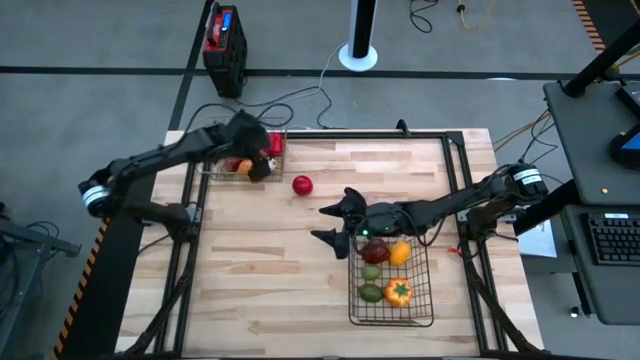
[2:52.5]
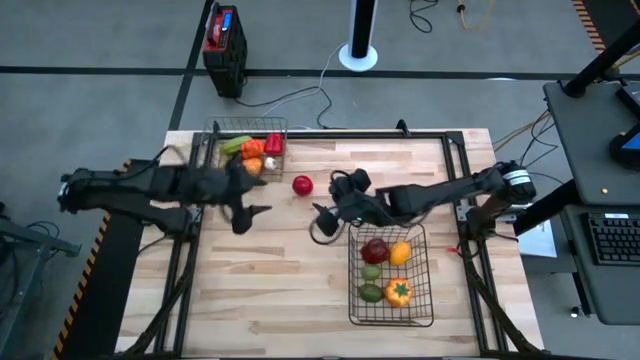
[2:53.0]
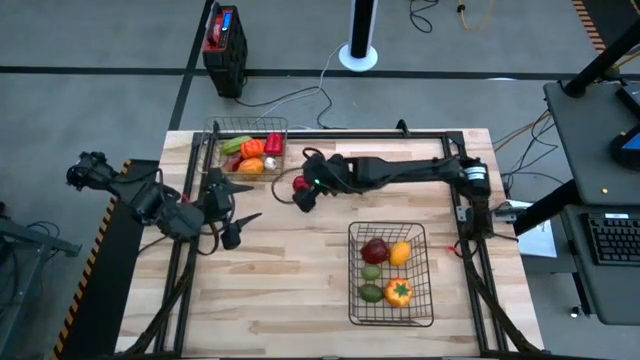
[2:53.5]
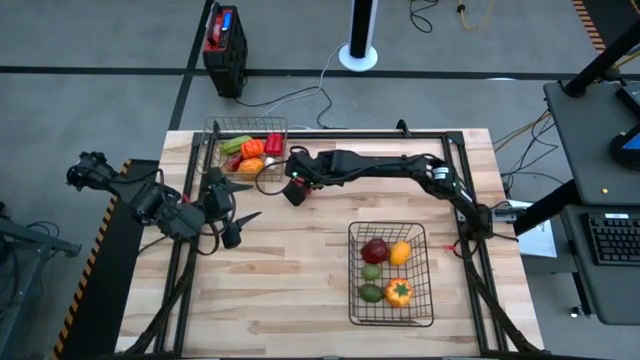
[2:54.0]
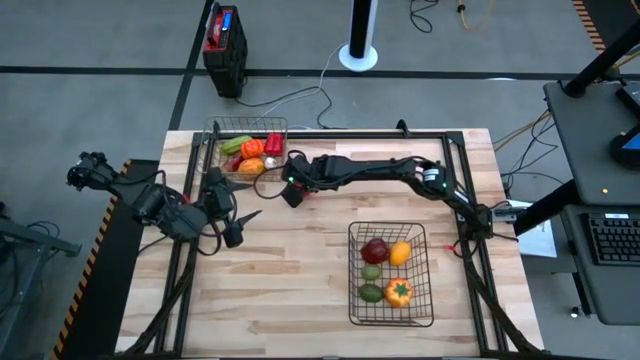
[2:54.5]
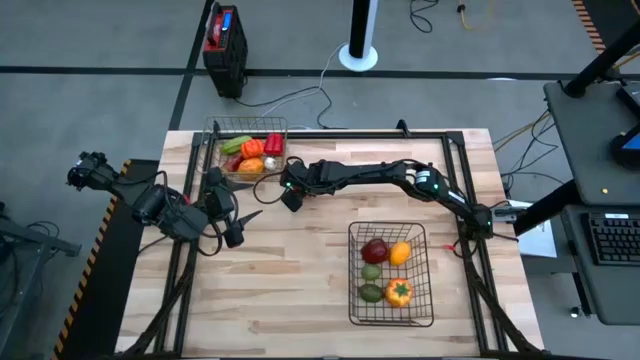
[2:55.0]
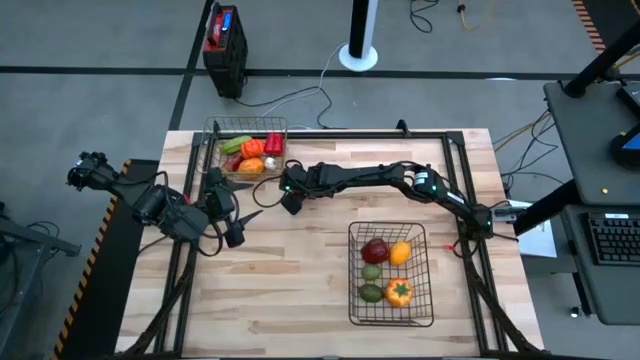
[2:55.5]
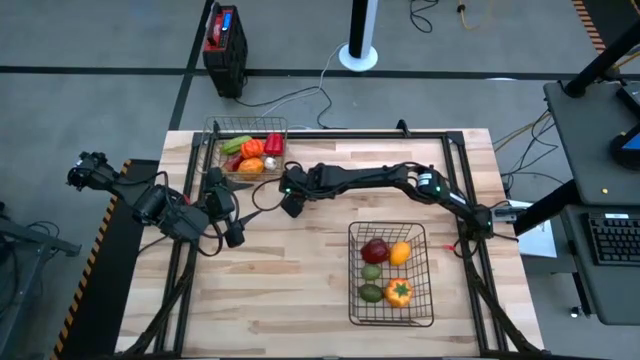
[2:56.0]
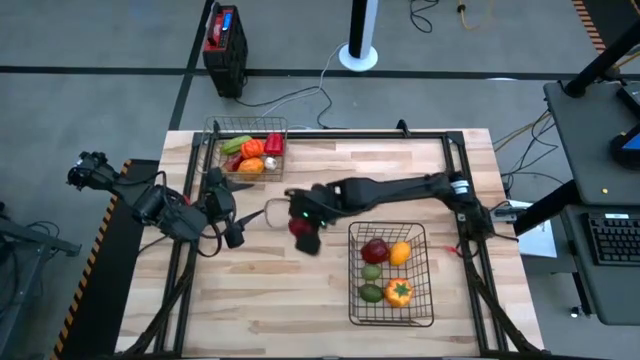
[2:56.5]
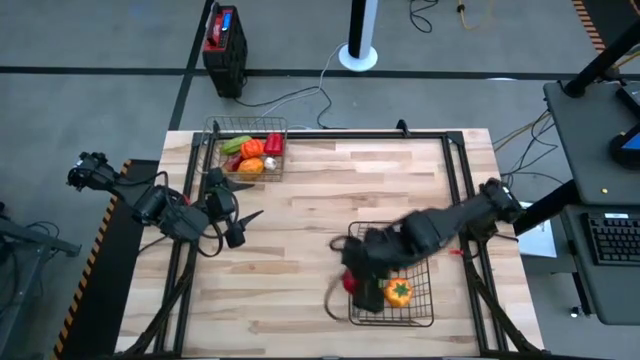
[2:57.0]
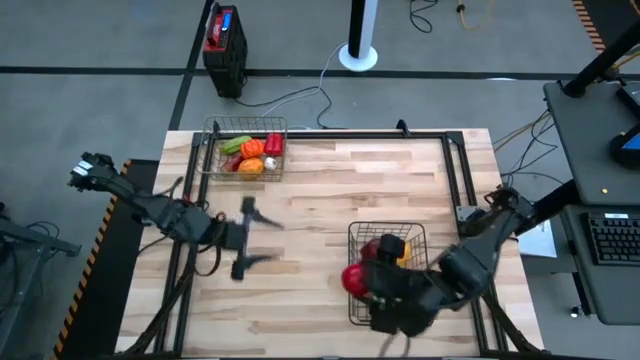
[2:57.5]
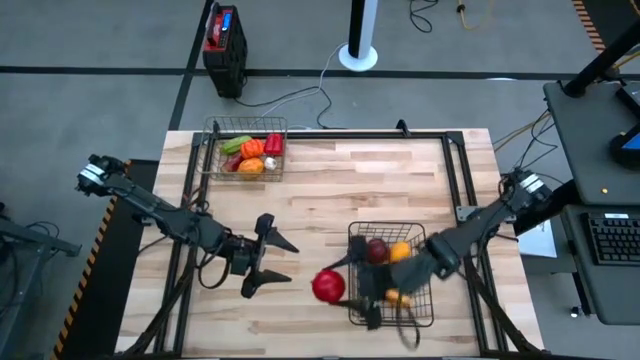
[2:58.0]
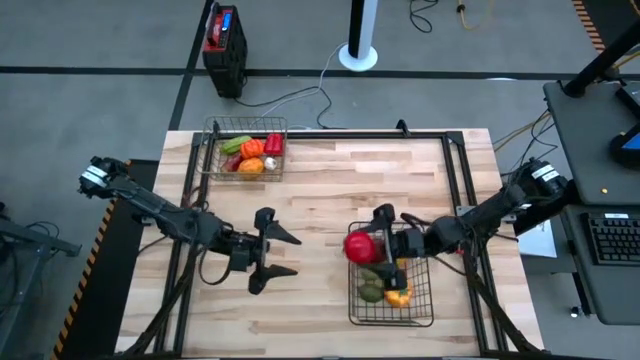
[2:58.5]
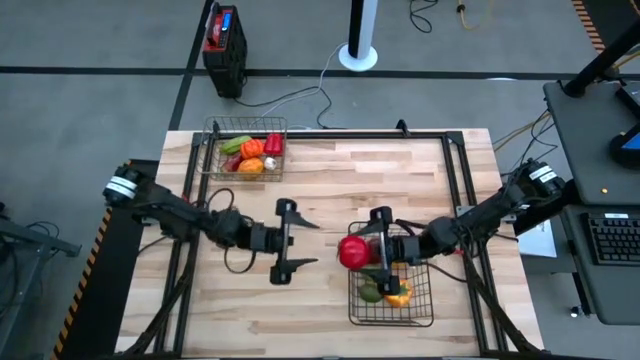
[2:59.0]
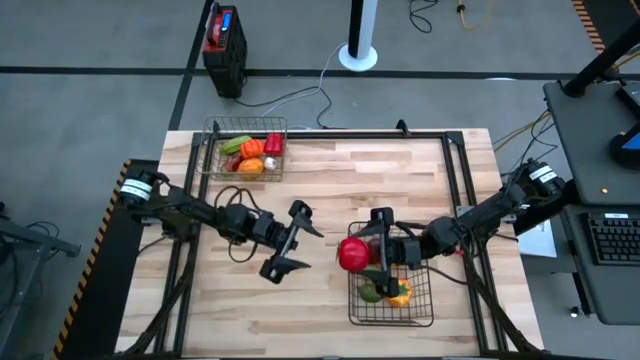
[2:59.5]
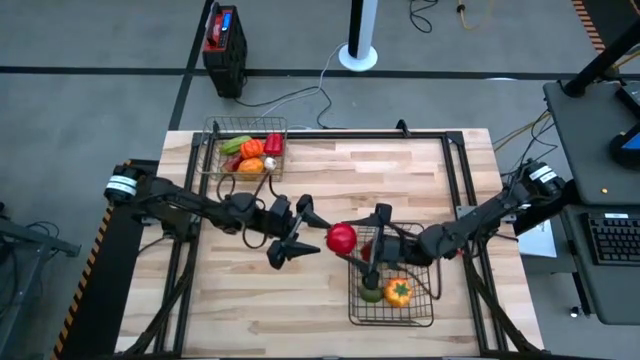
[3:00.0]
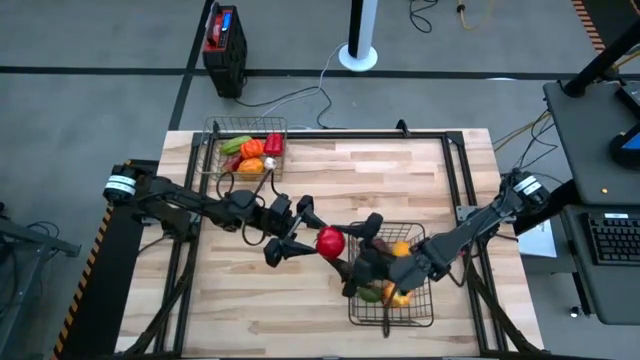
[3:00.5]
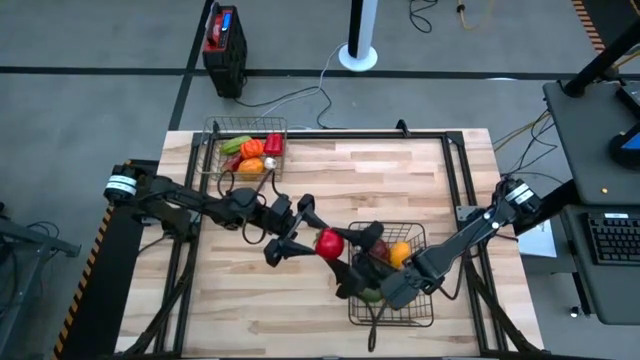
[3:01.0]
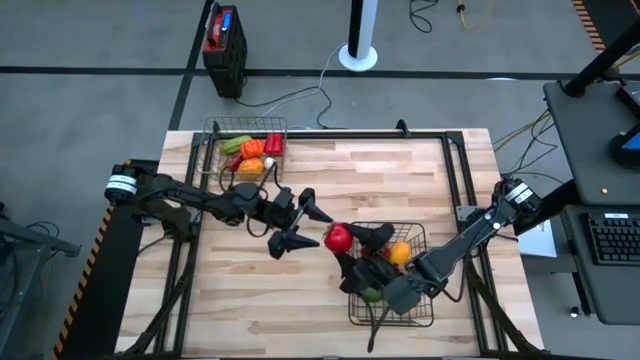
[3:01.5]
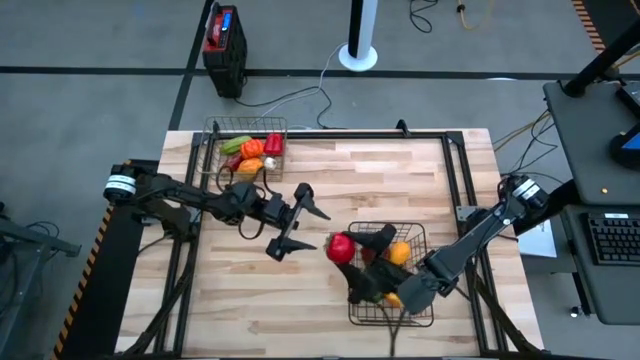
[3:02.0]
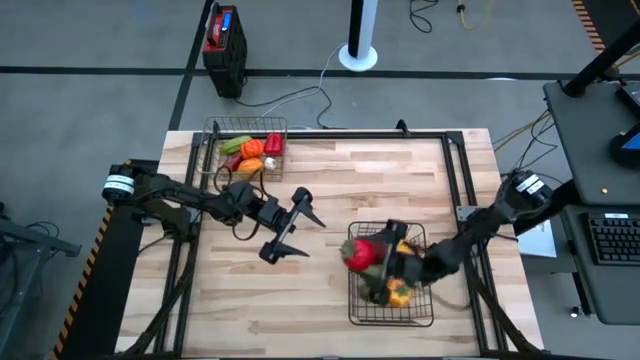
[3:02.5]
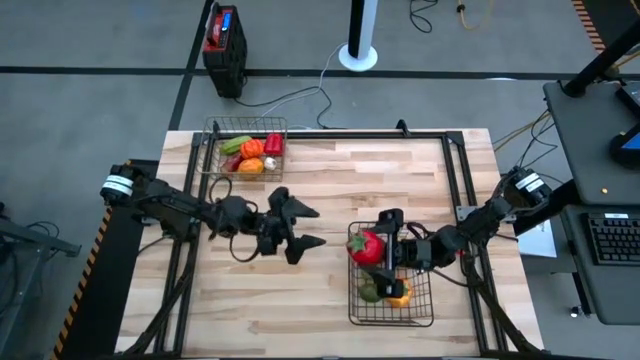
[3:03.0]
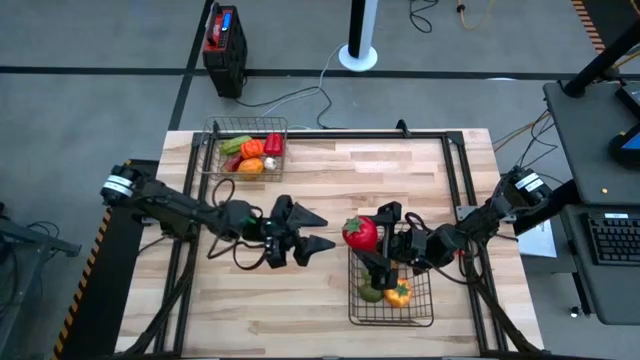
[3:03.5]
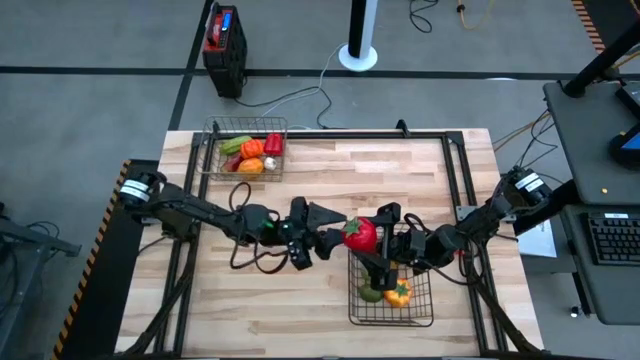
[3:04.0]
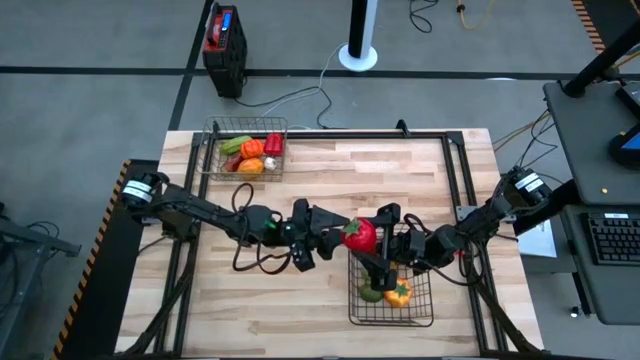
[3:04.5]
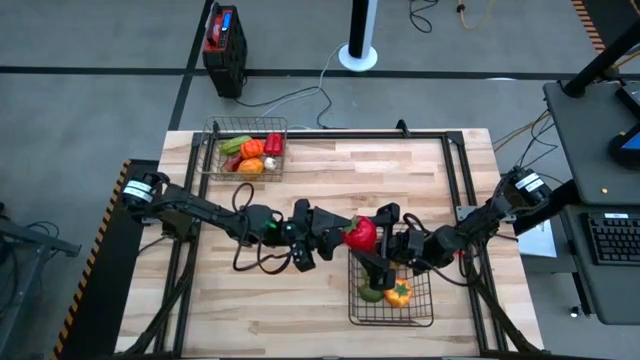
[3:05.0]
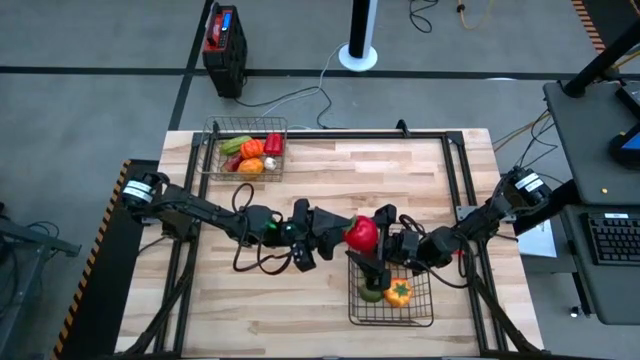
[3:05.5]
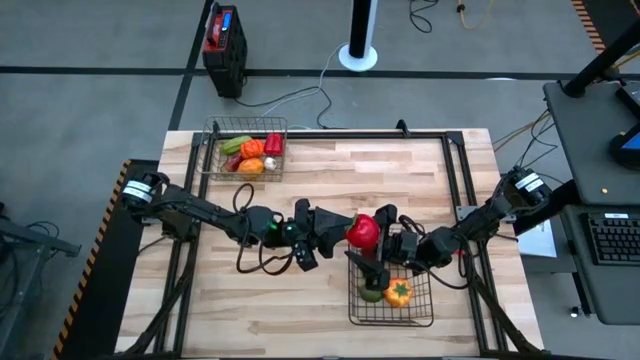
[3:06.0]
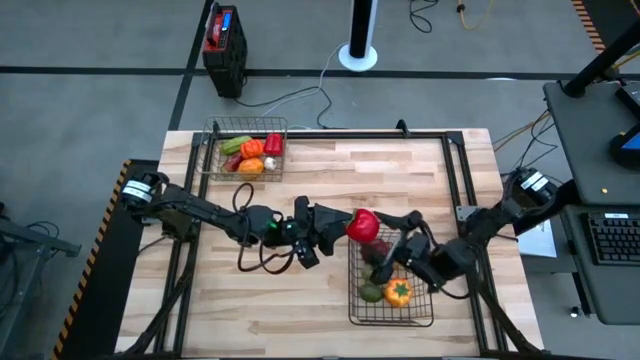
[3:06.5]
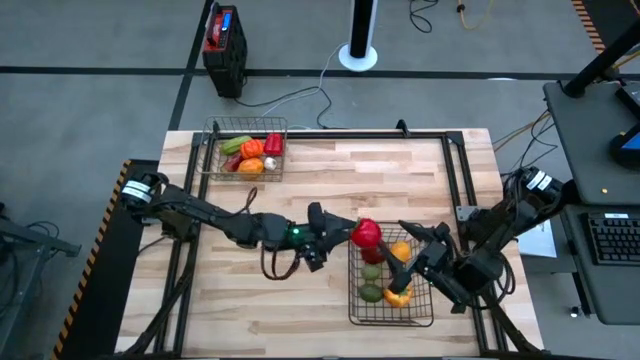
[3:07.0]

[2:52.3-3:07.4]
Task: Sort produce into baskets
Put the red tomato into the black wire basket

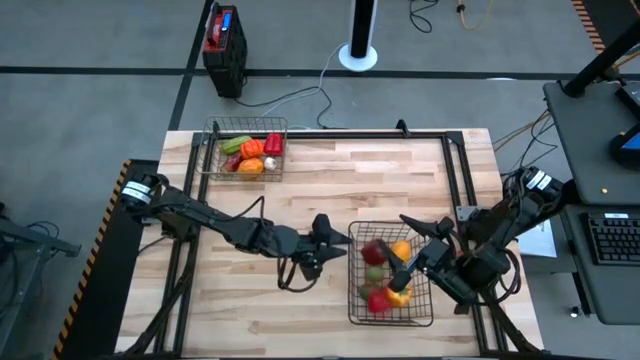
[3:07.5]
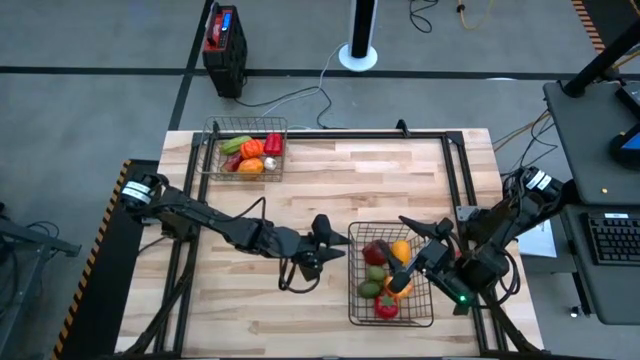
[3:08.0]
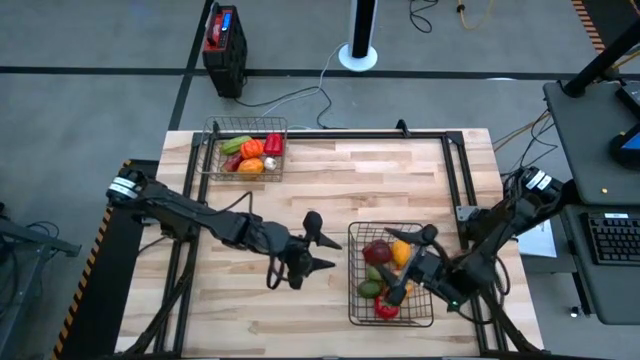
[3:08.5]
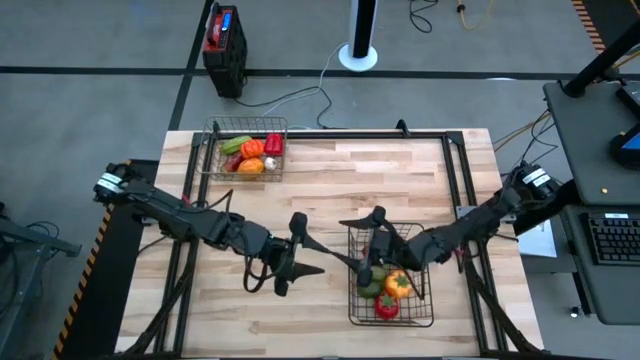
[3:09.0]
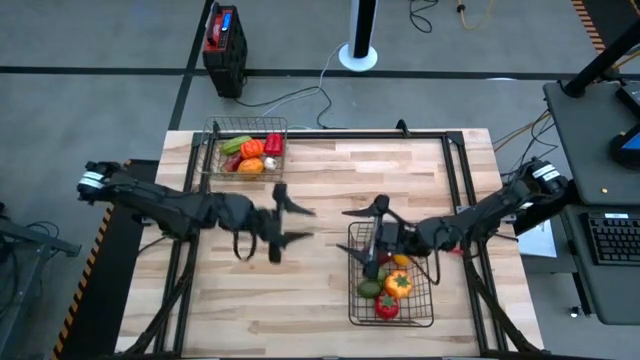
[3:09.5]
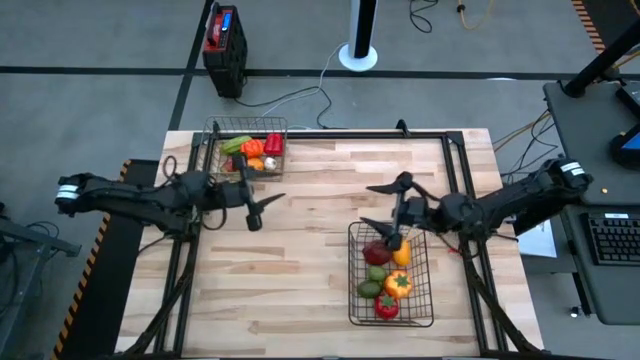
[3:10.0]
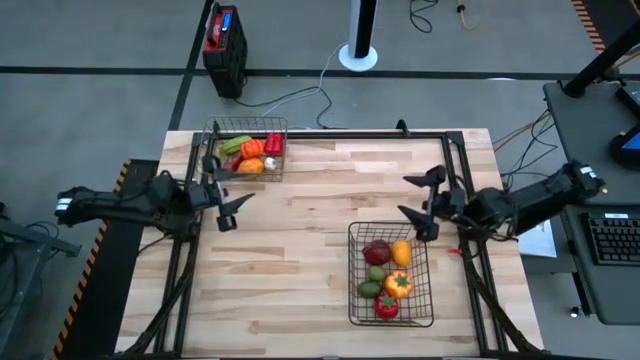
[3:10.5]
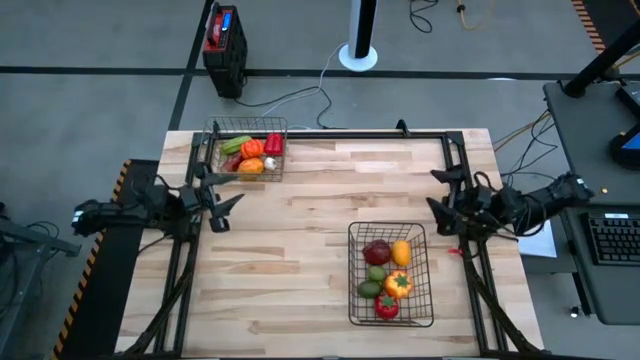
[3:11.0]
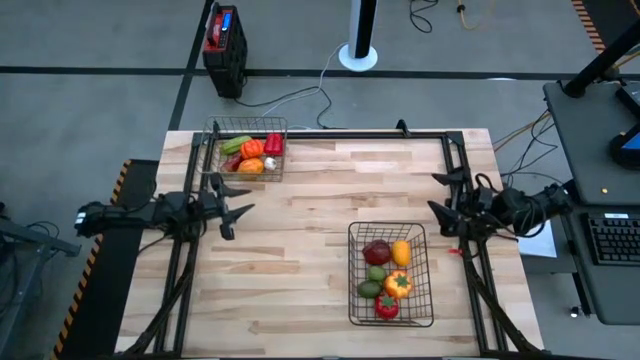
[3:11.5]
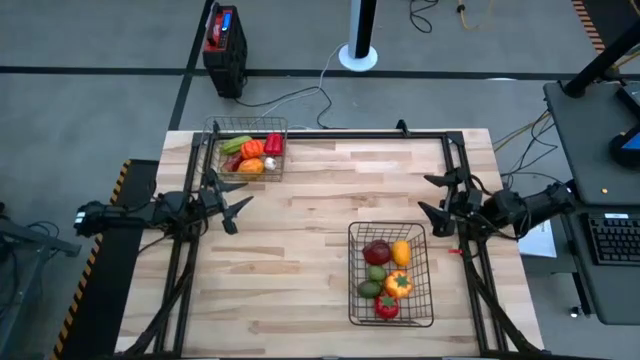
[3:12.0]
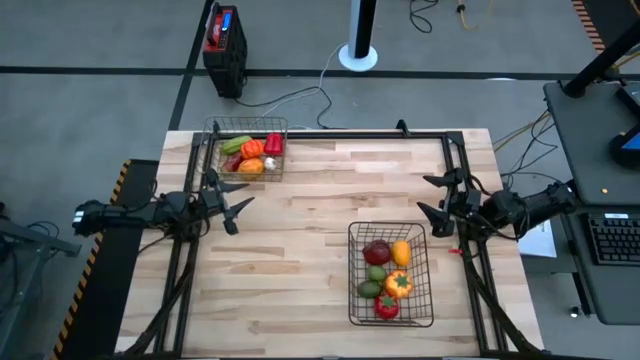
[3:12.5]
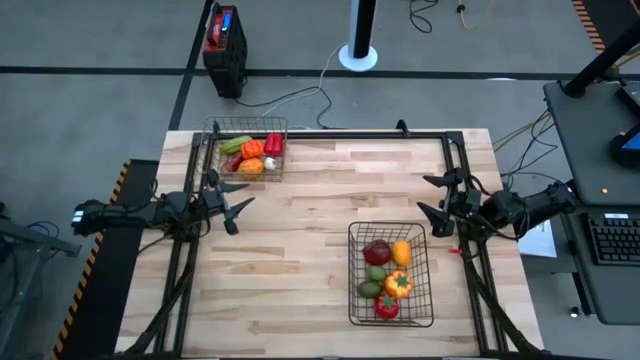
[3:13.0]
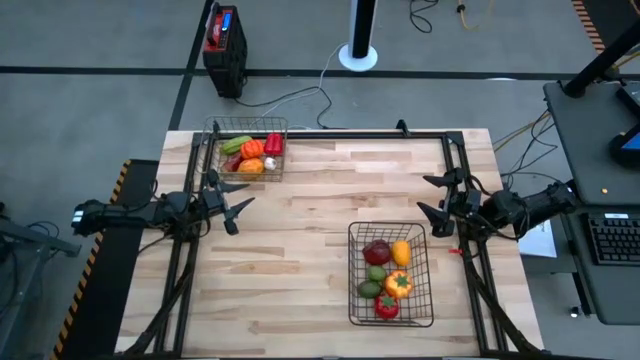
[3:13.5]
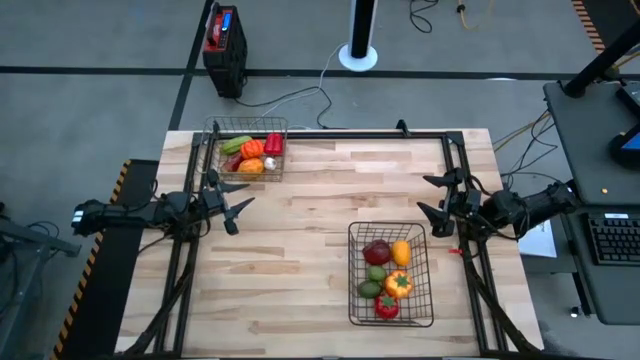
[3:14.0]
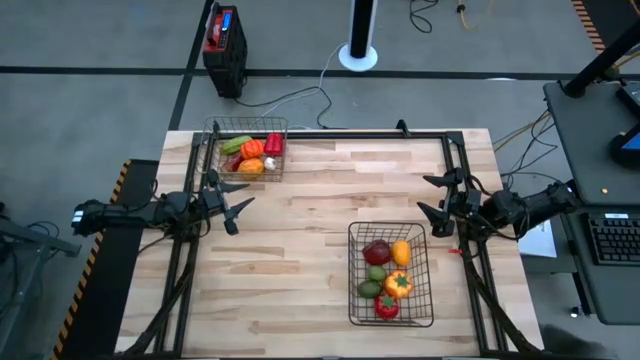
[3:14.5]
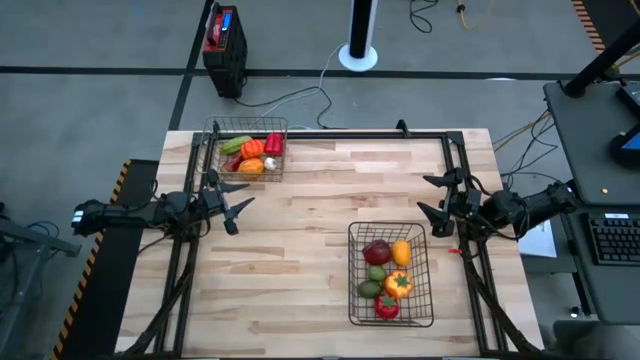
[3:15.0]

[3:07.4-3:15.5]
Return to Home Position
